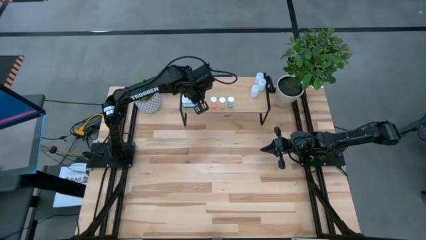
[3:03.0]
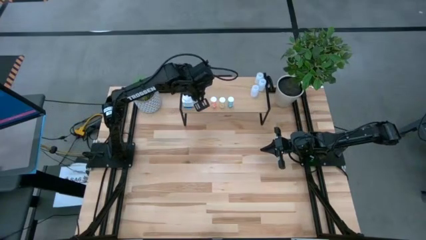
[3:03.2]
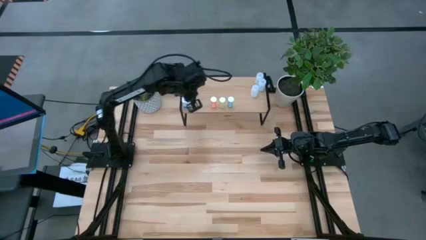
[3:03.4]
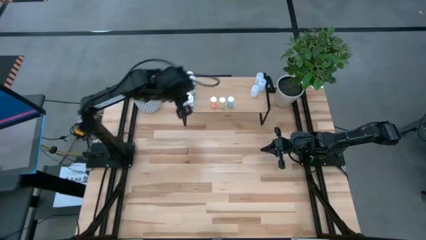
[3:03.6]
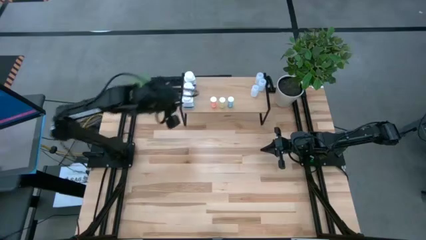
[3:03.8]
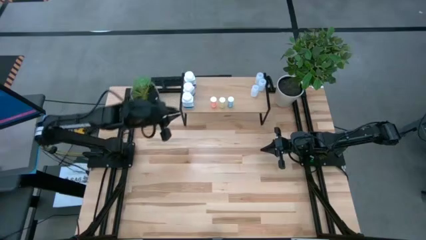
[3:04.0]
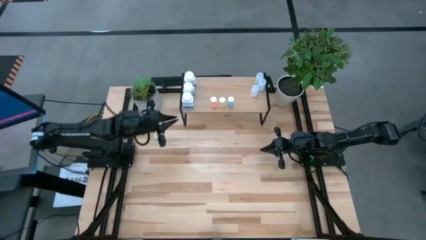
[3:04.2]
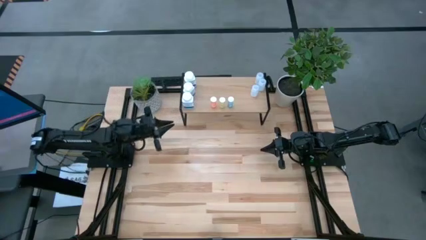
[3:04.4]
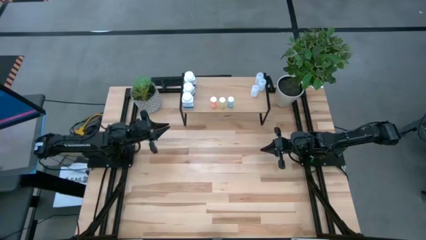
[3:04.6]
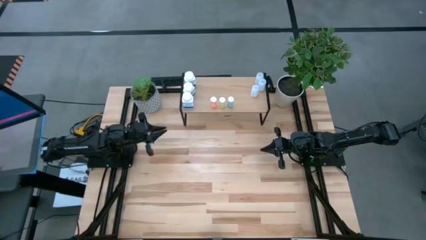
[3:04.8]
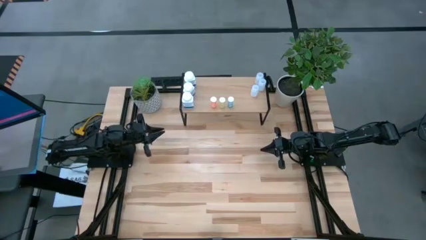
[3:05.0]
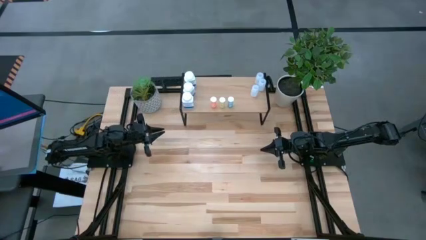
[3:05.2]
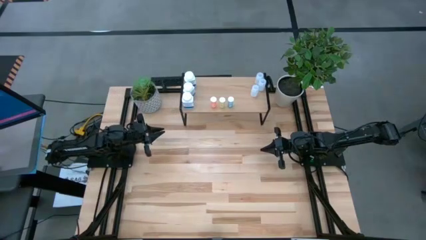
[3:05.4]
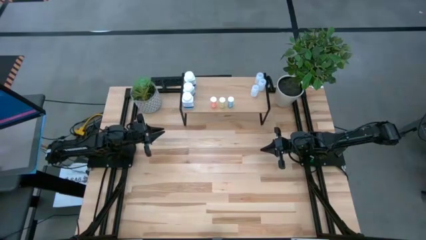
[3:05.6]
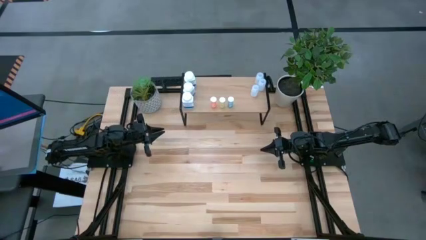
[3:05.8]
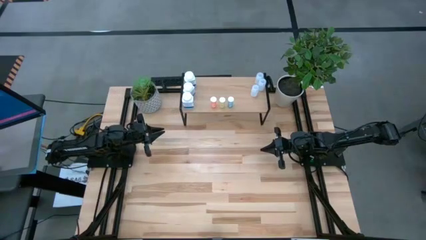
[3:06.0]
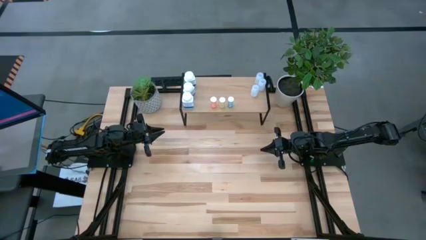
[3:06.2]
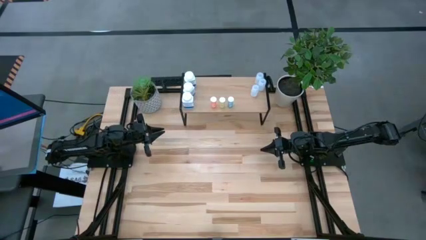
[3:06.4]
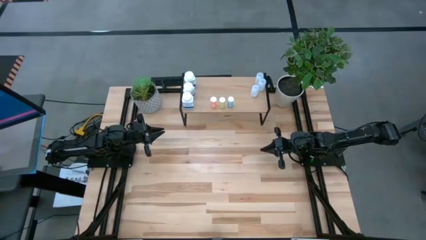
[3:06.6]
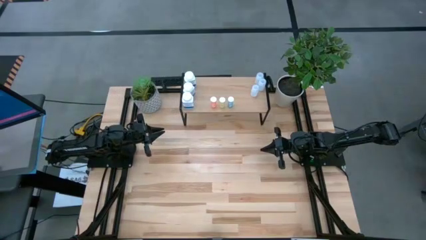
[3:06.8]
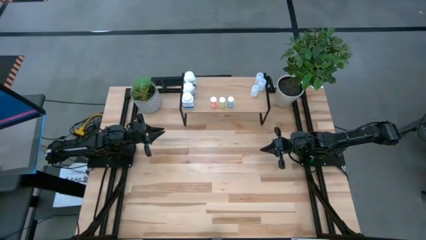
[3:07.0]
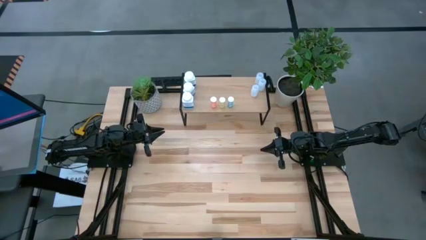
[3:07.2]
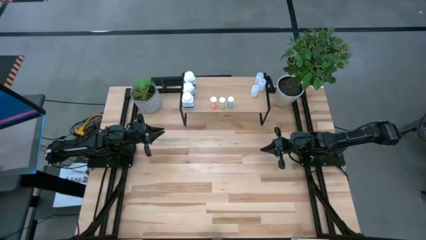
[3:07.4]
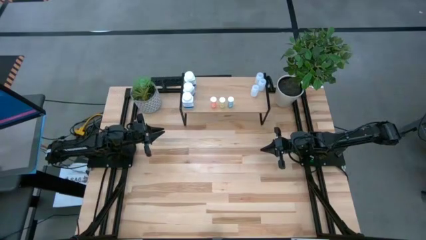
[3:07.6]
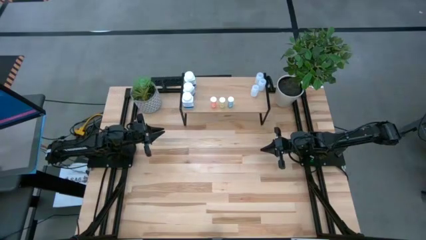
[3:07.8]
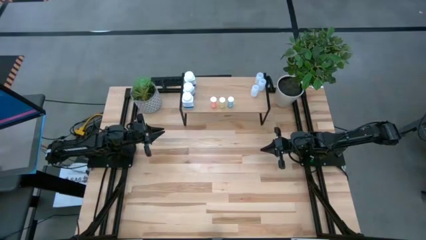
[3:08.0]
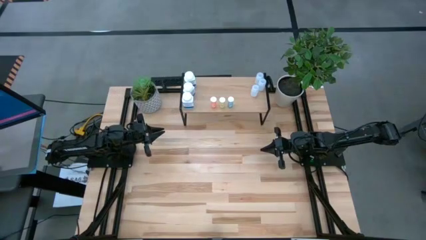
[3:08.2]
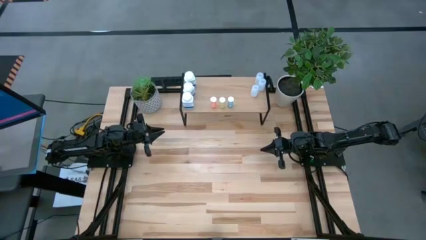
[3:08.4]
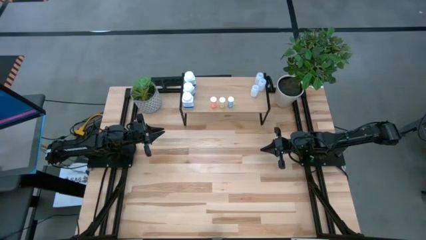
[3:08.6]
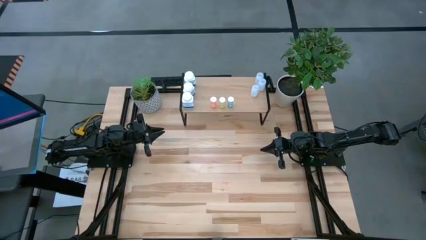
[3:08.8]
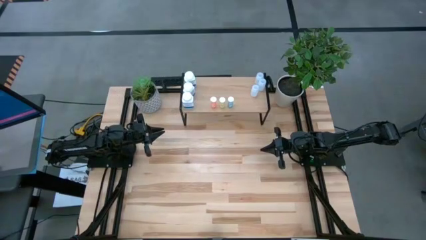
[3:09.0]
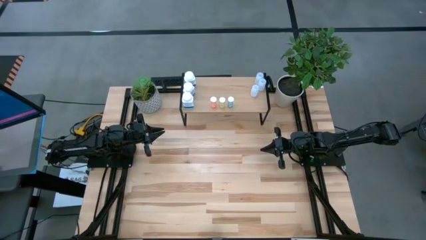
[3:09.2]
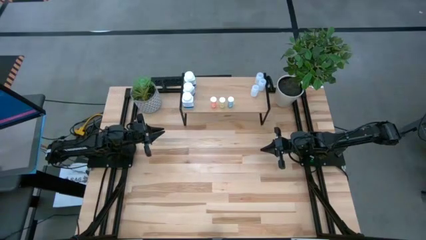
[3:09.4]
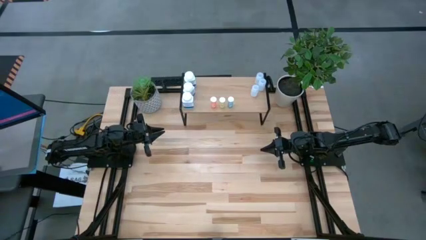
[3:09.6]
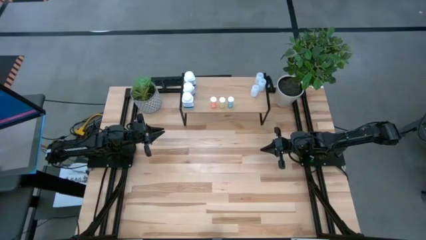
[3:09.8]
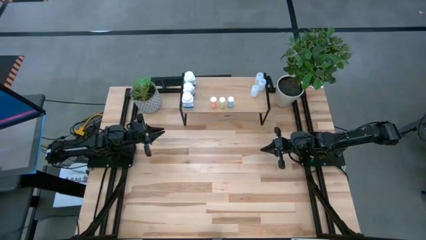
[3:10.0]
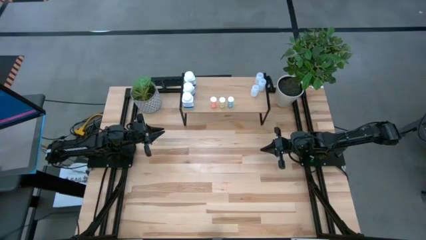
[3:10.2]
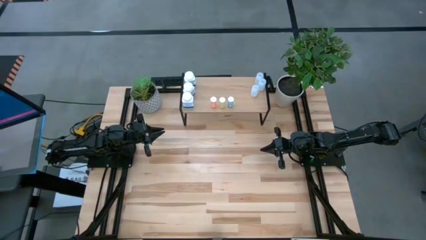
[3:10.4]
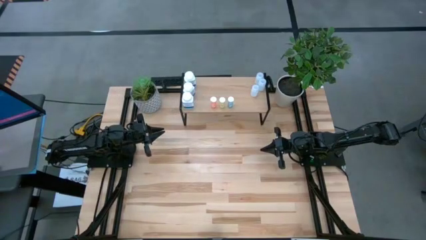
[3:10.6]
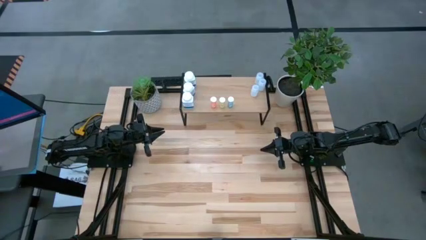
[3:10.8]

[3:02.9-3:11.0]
Task: Pick and place medicine bottles onto shelf by color
Return to Home Position
